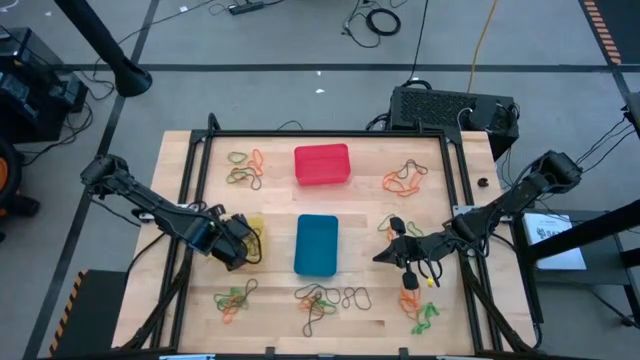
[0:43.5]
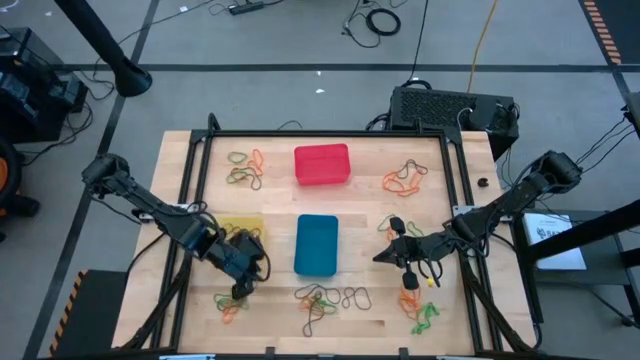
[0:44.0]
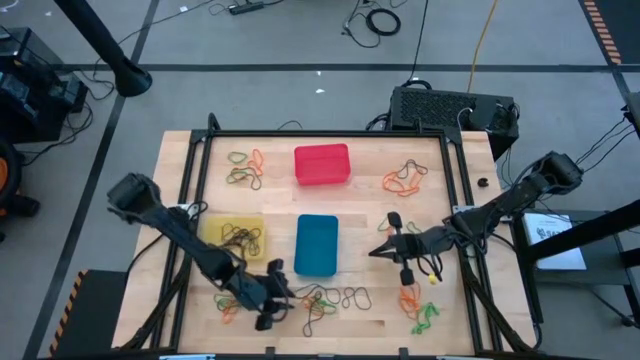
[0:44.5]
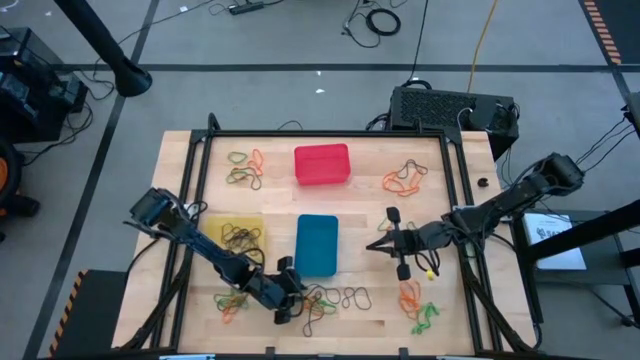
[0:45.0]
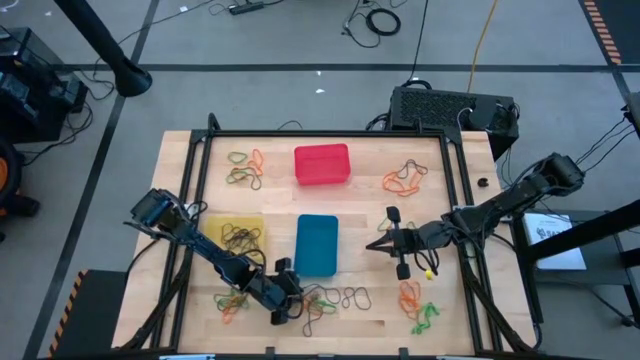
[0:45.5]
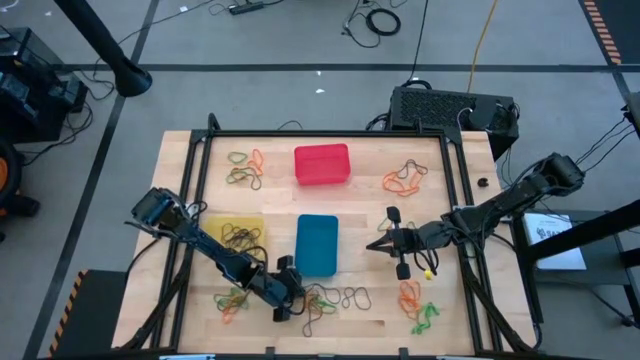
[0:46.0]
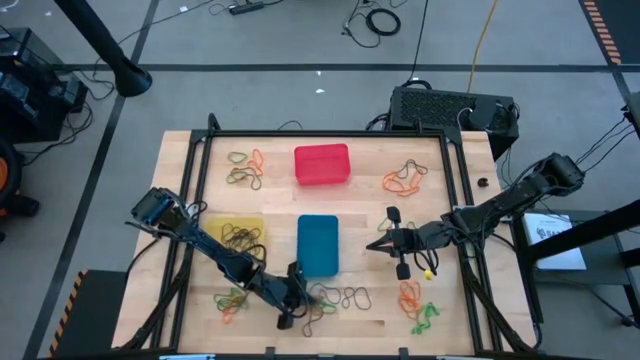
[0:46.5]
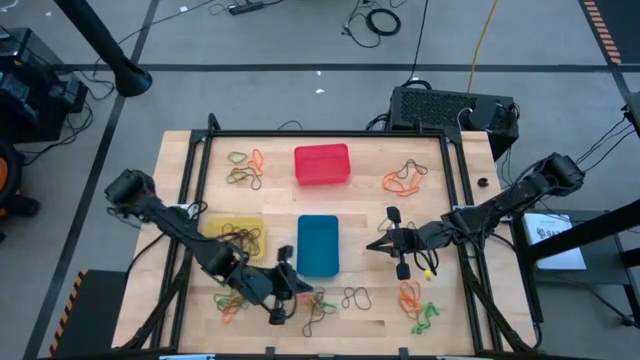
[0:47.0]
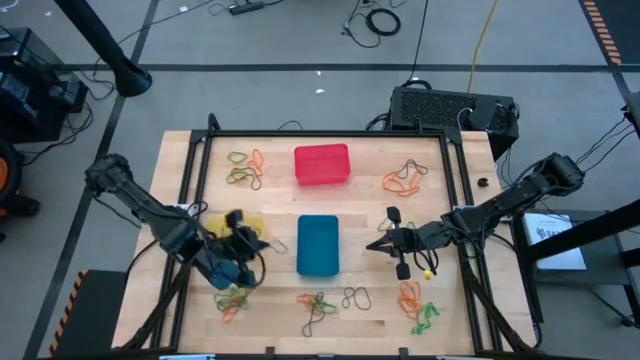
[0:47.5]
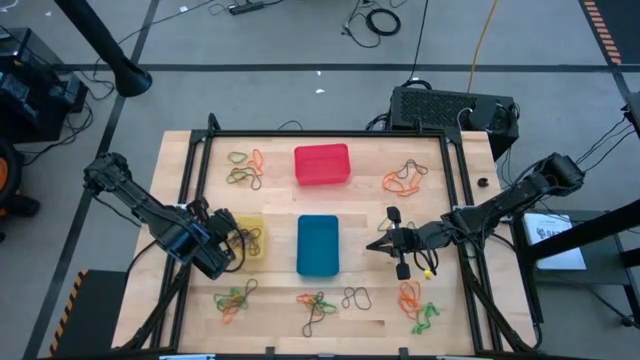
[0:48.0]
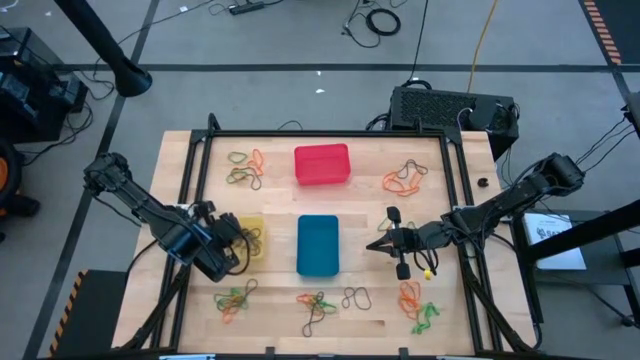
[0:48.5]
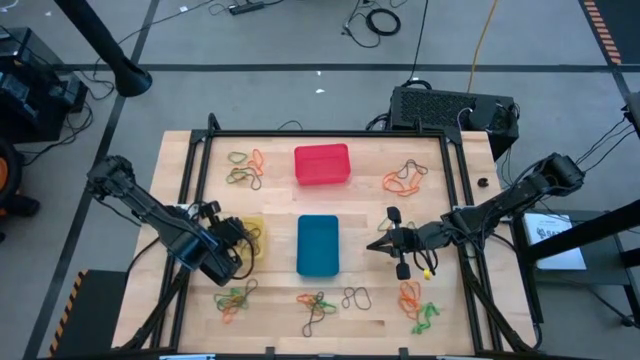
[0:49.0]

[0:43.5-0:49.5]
Task: Sort rubber bands into baskets
Put the purple rubber band into the yellow bin

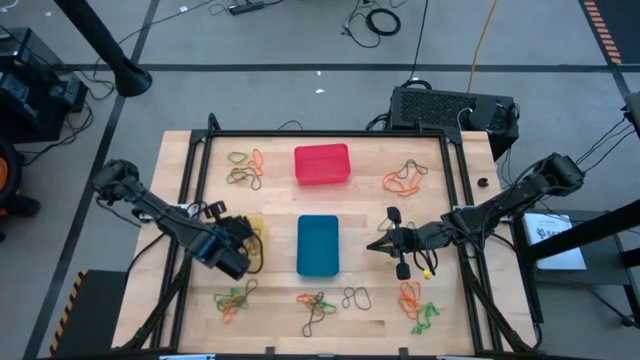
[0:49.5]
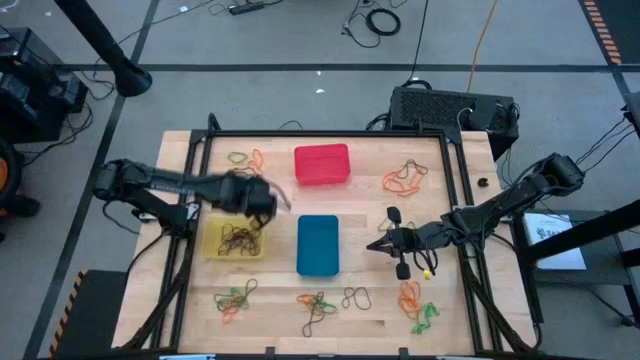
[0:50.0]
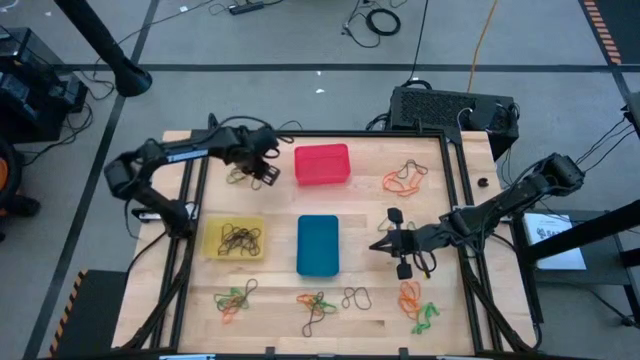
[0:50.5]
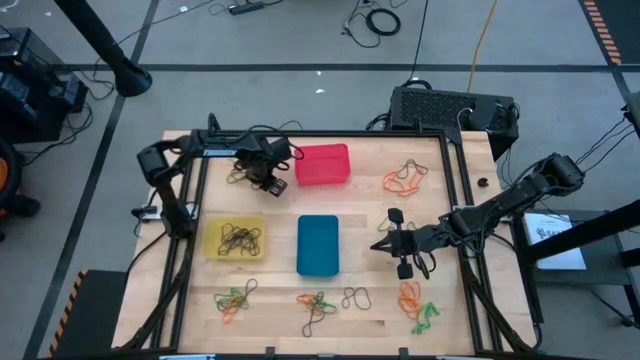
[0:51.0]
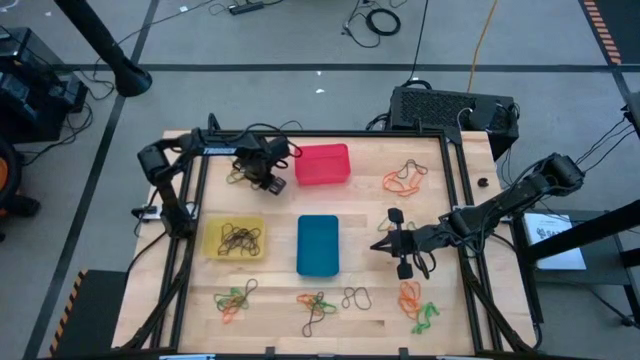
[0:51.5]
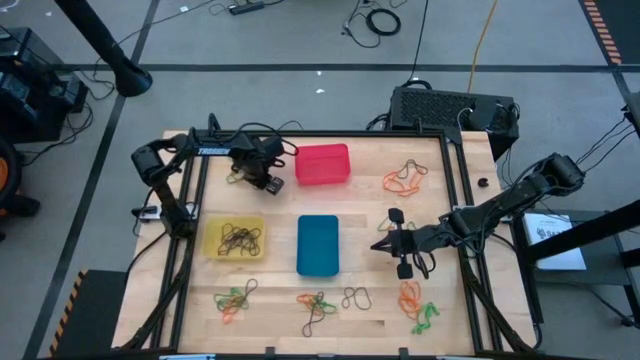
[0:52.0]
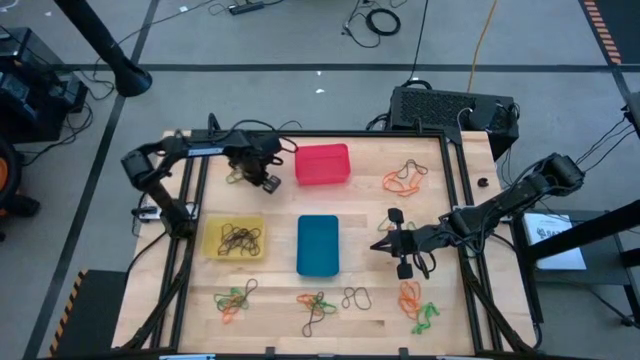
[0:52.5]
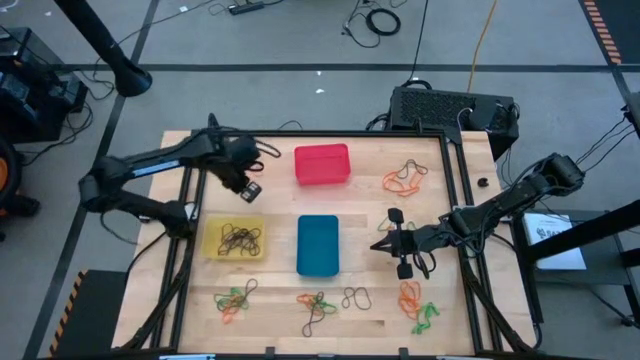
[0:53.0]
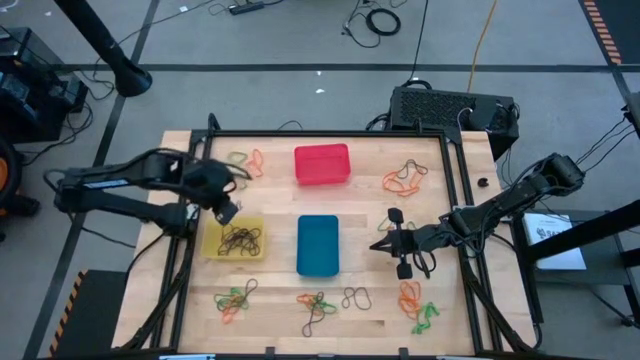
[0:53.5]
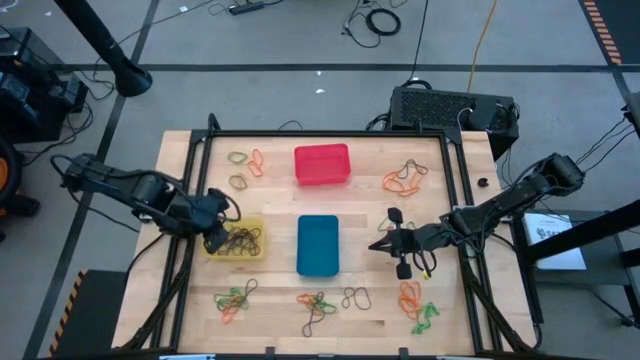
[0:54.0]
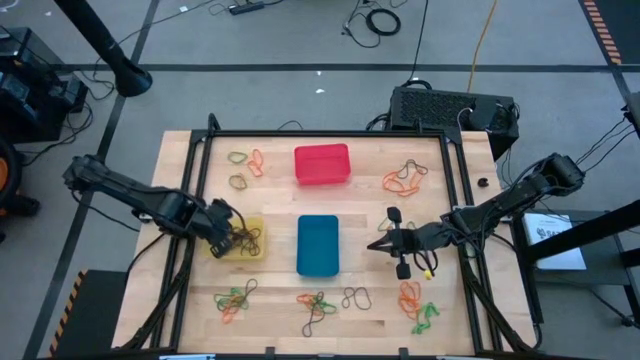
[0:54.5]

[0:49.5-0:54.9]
Put the purple rubber band into the yellow bin

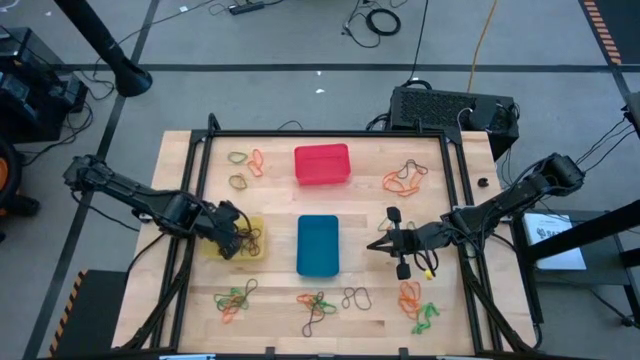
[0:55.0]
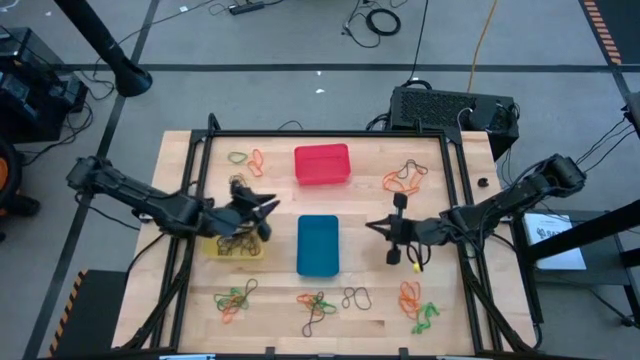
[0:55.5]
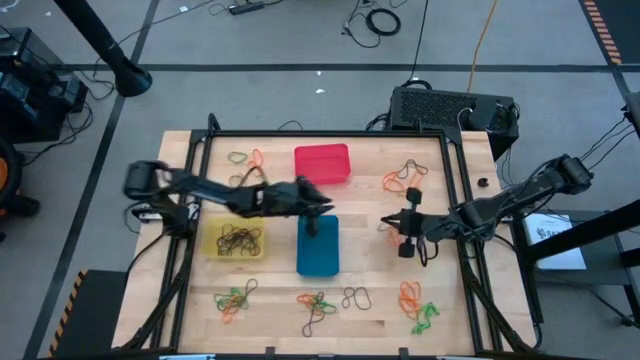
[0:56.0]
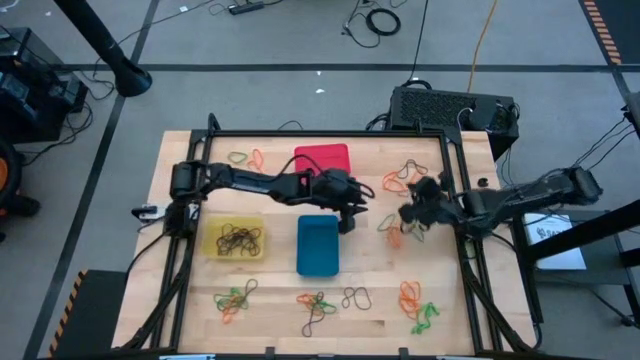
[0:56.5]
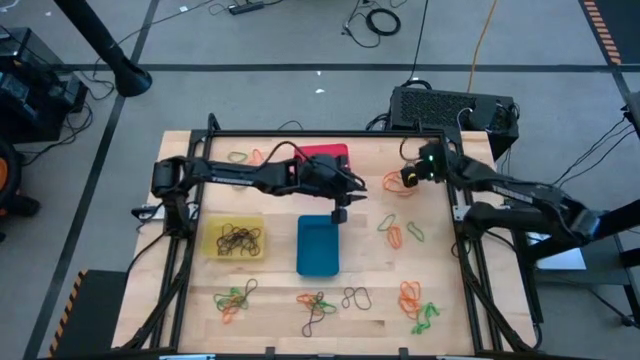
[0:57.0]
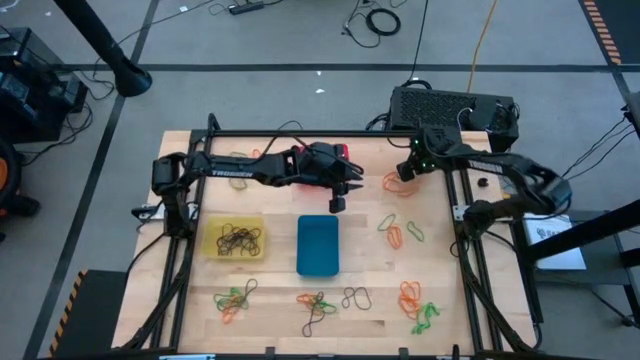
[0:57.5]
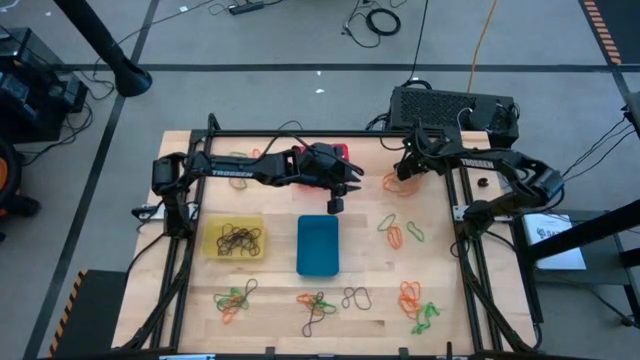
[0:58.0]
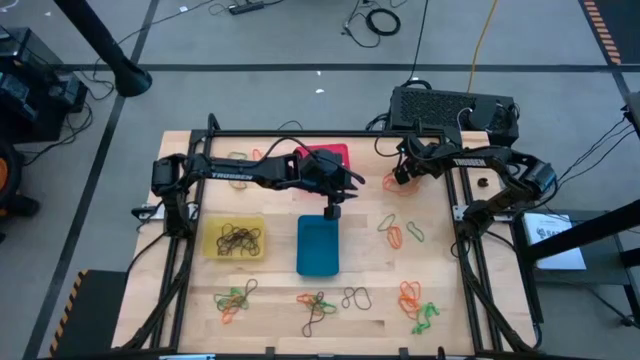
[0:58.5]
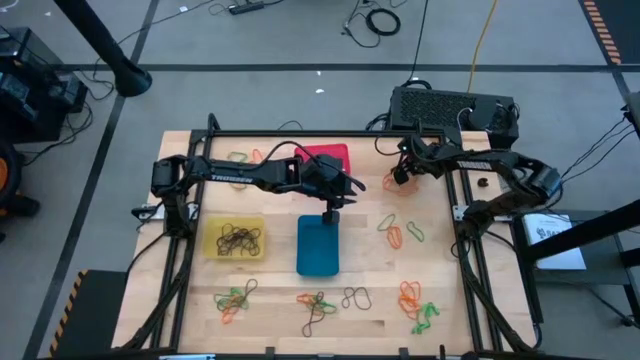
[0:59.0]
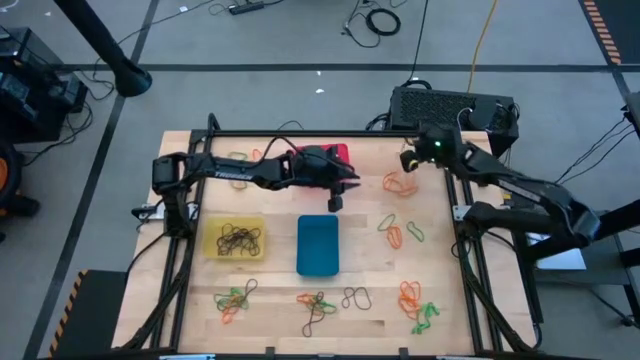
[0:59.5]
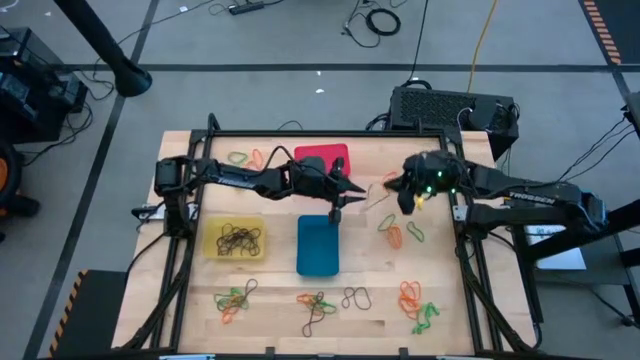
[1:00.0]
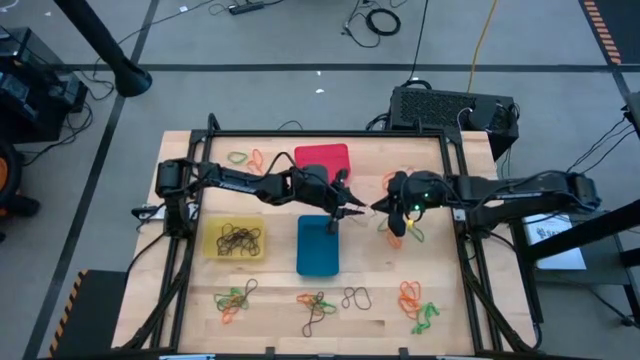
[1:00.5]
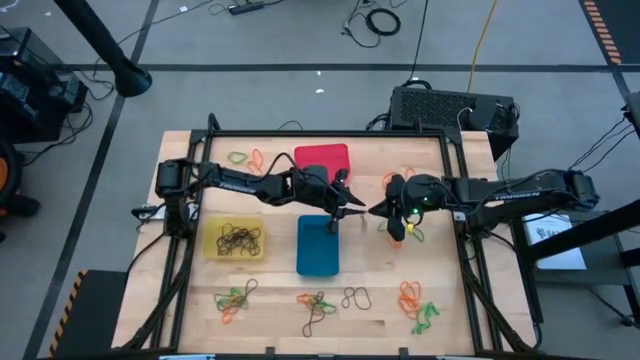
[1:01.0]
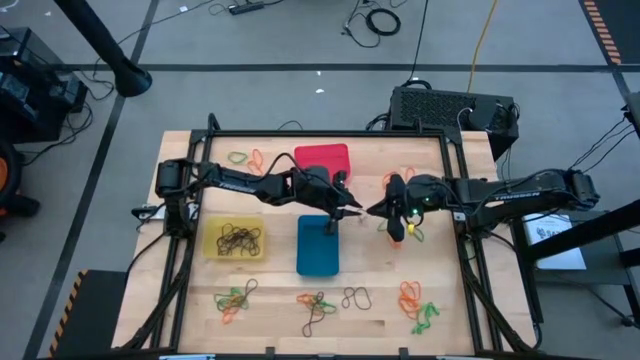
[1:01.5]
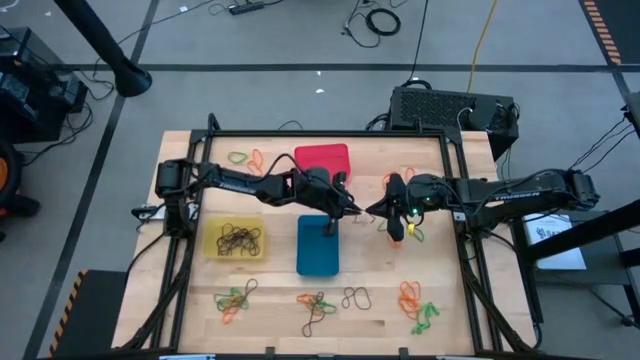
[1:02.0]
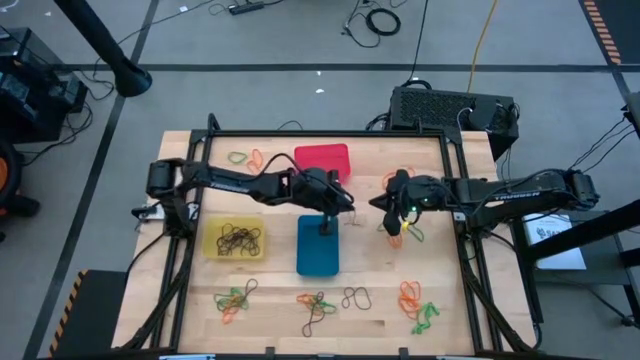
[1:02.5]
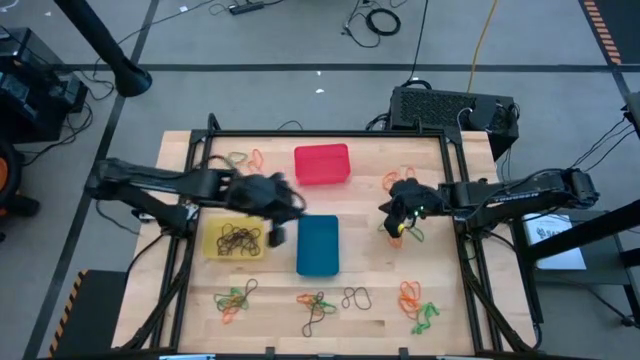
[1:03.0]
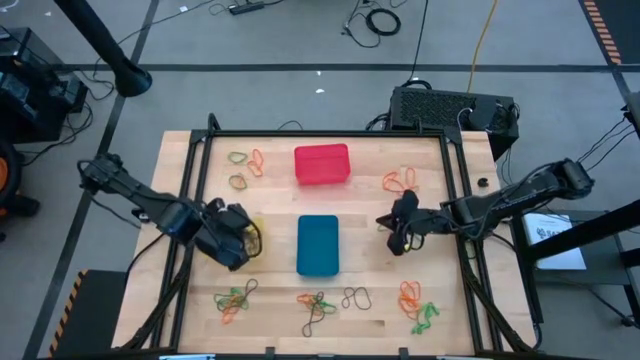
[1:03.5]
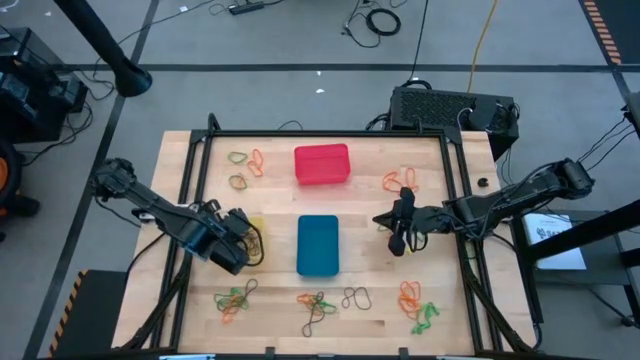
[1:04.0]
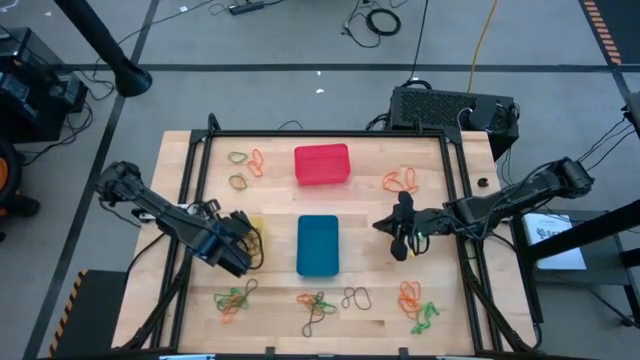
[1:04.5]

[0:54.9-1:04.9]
Put the purple rubber band into the yellow bin
